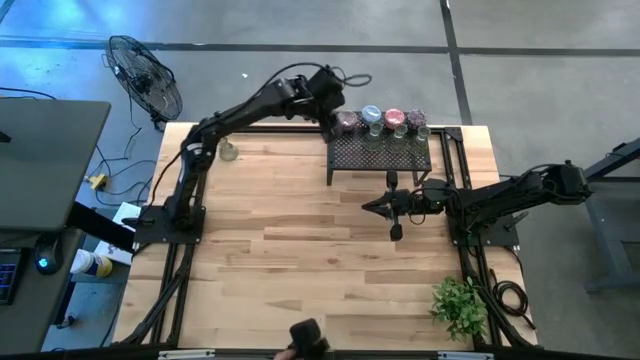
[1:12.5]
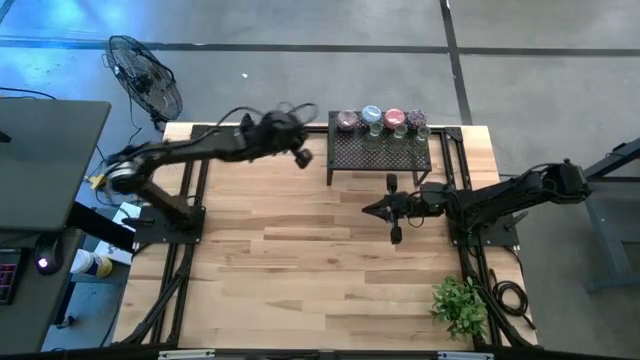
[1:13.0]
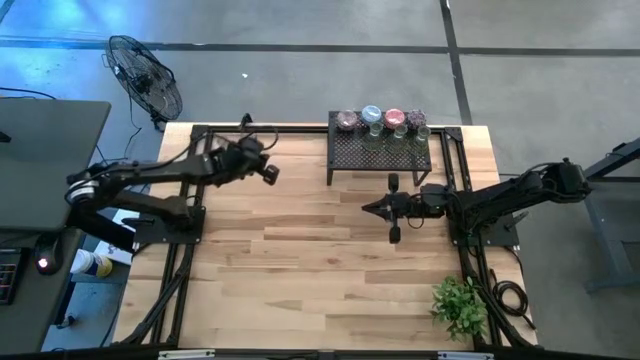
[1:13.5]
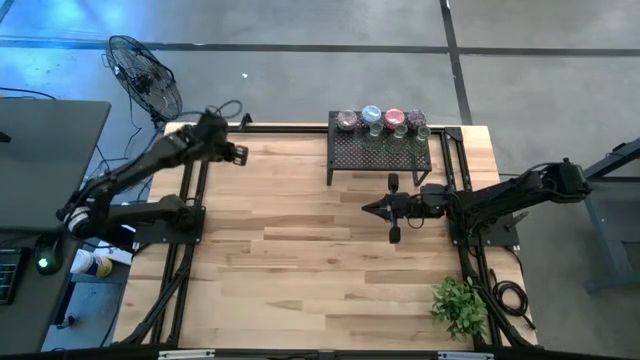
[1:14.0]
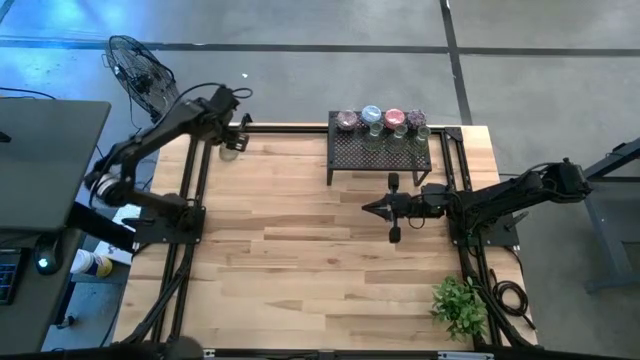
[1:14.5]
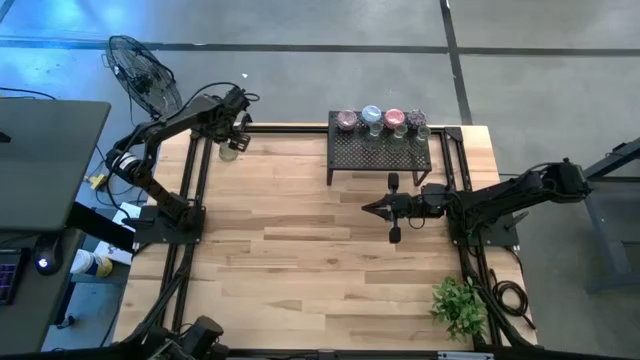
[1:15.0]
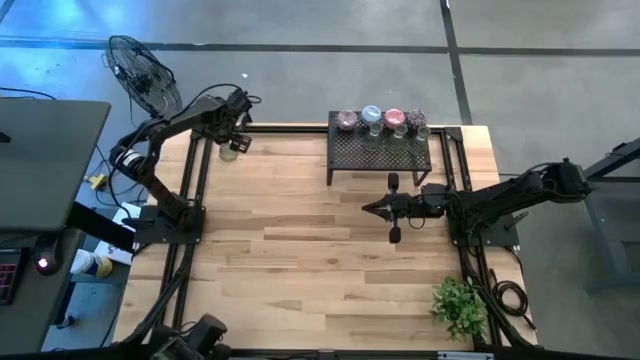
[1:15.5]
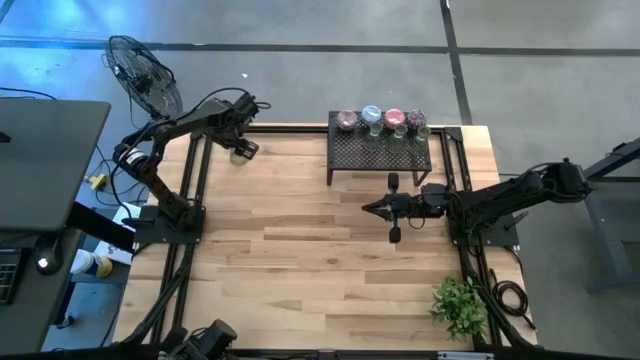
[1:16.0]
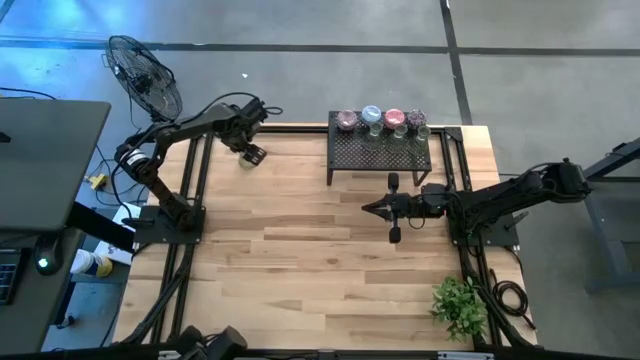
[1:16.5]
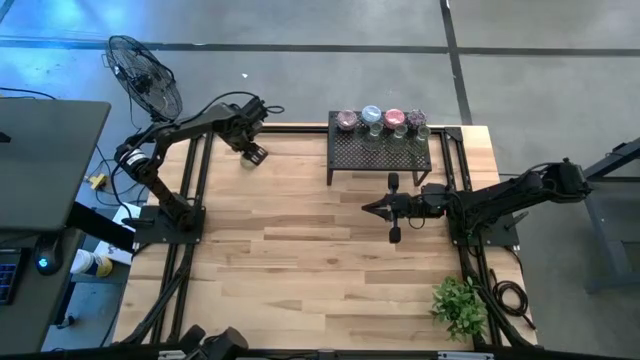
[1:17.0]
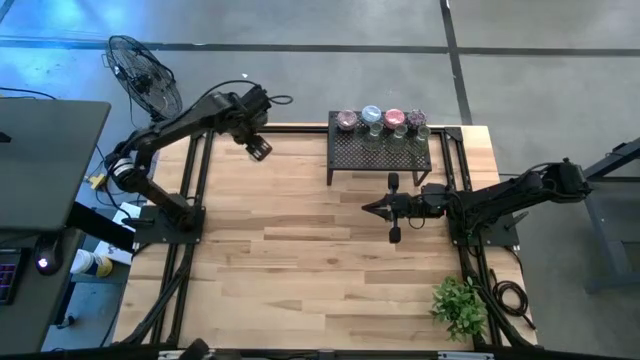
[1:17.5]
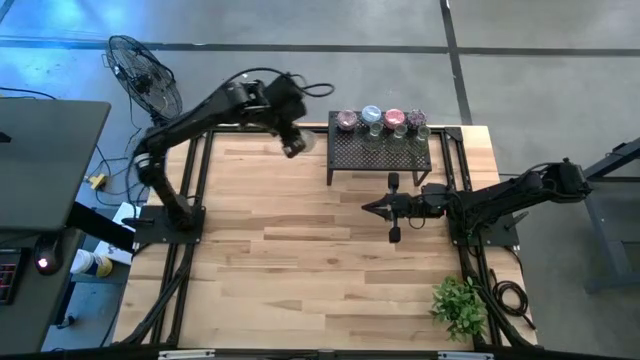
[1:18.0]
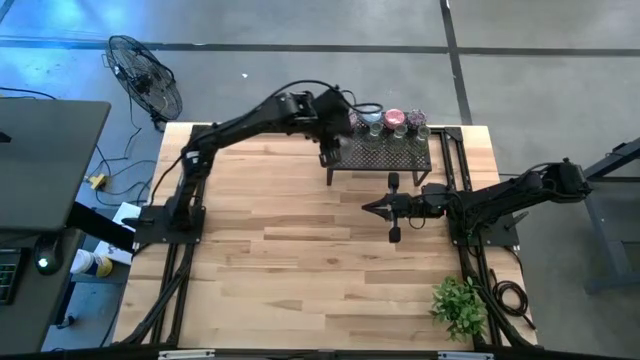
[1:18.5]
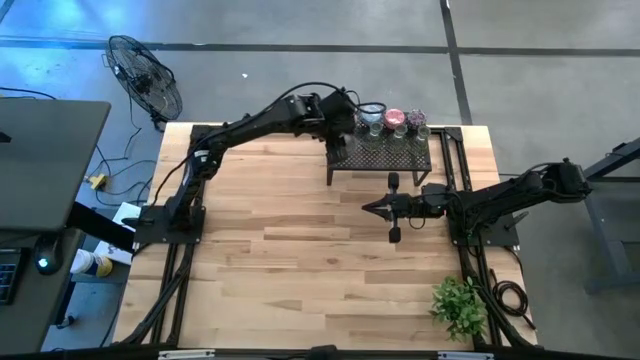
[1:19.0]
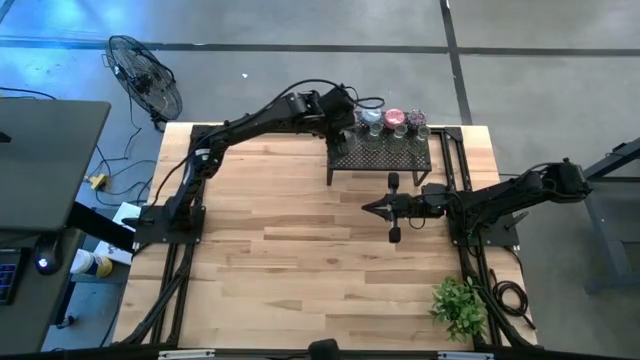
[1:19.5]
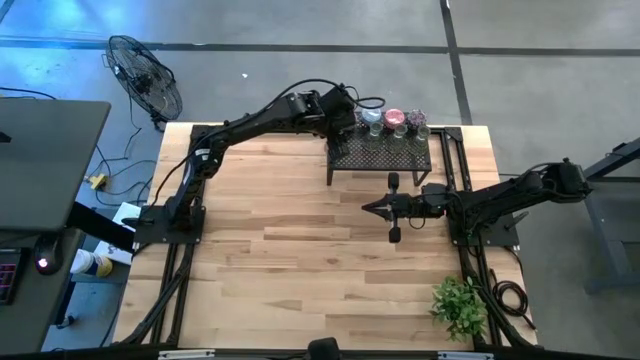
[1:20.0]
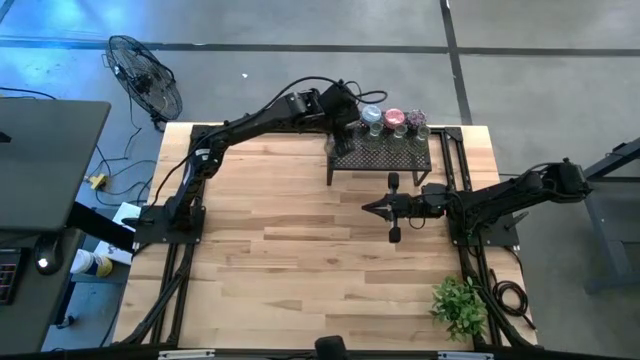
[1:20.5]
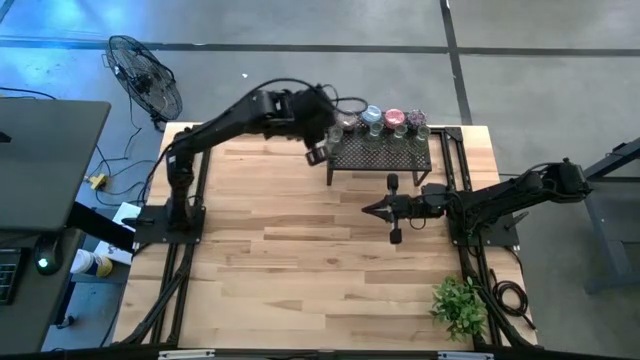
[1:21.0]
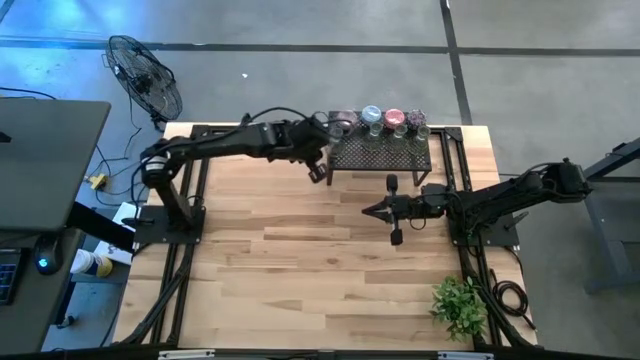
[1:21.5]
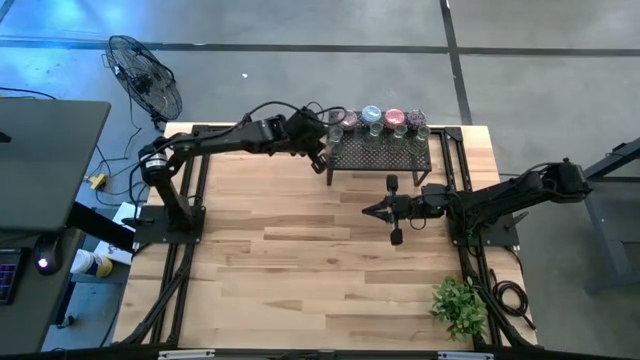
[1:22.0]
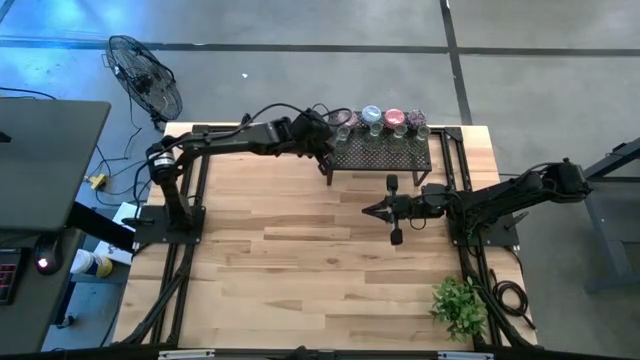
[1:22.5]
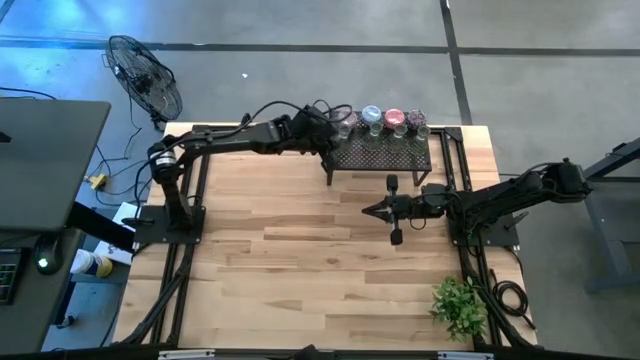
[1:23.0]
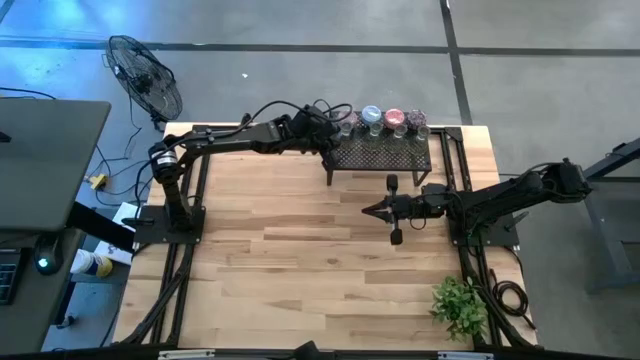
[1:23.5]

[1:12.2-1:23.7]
Task: Pick & Place candle stick holders
Put the green glass candle holder on the shelf aligned with the other green glass candle holders

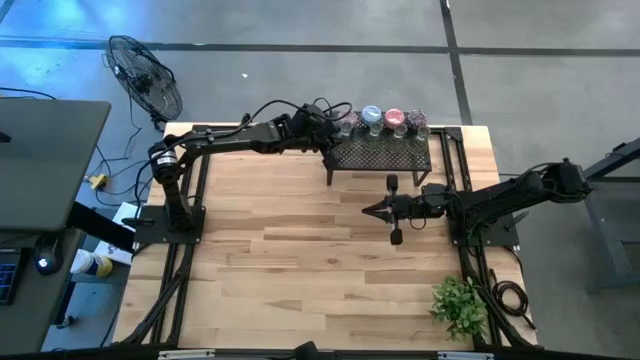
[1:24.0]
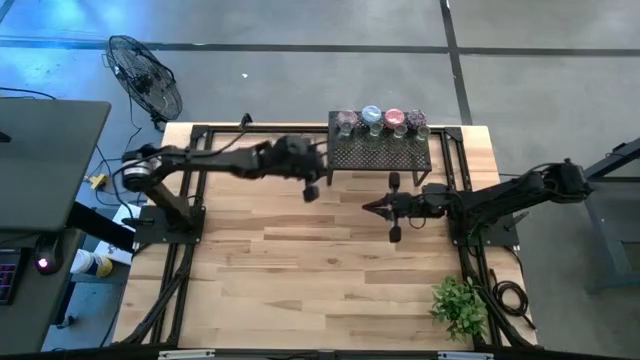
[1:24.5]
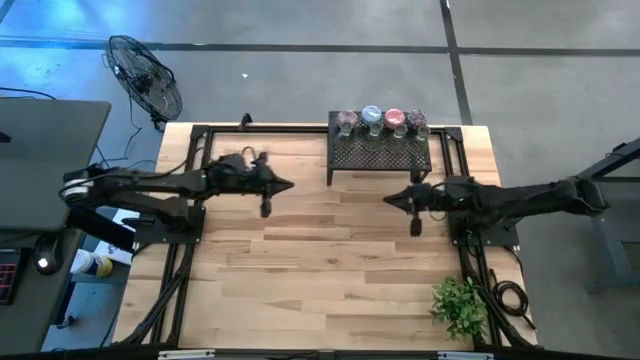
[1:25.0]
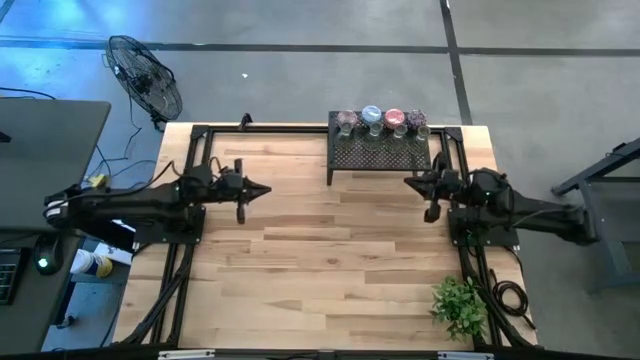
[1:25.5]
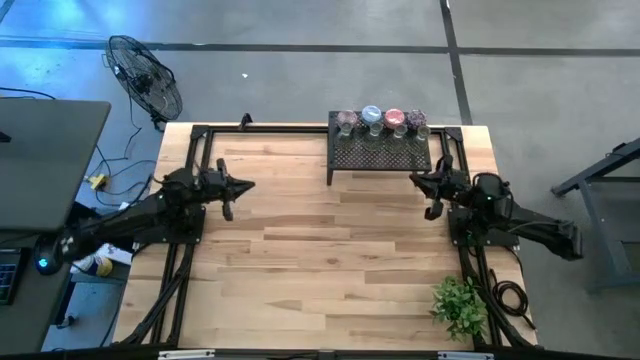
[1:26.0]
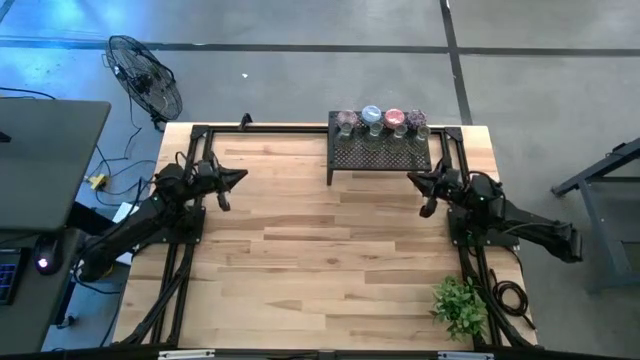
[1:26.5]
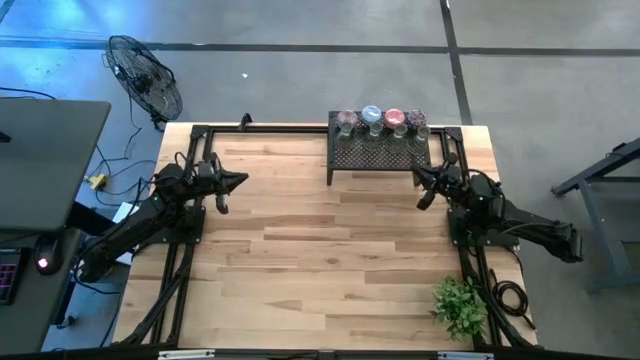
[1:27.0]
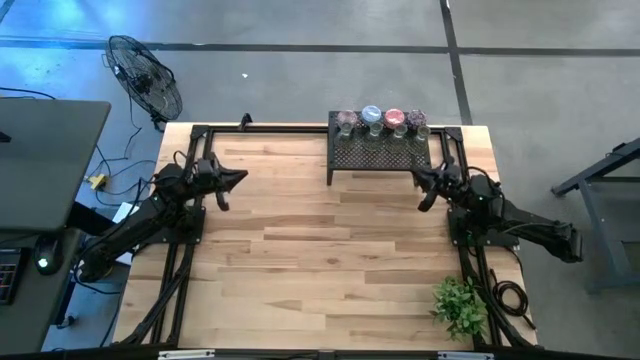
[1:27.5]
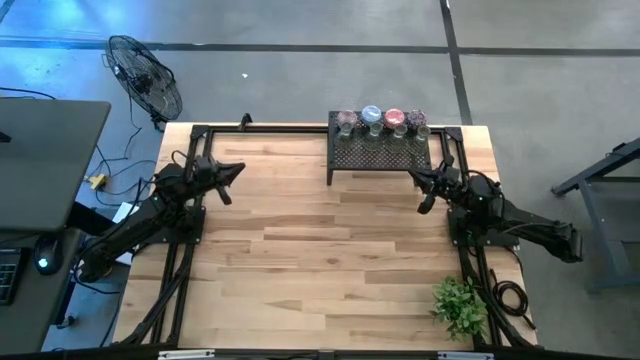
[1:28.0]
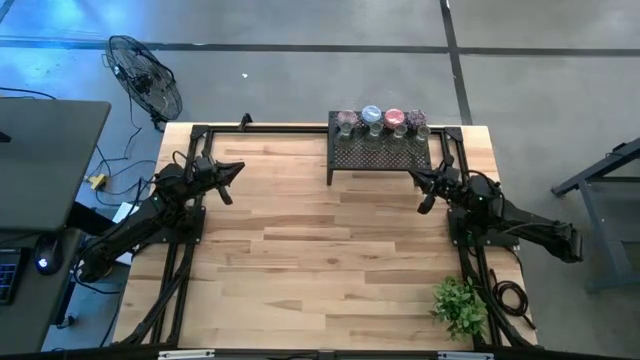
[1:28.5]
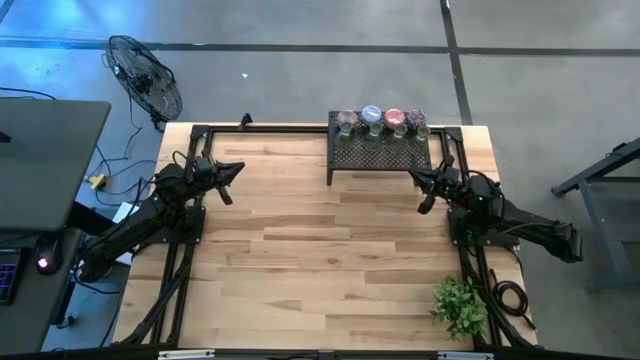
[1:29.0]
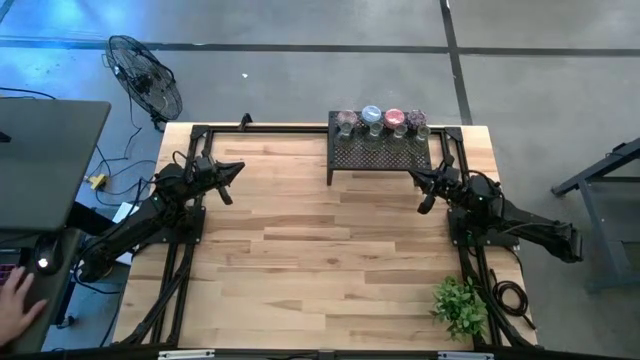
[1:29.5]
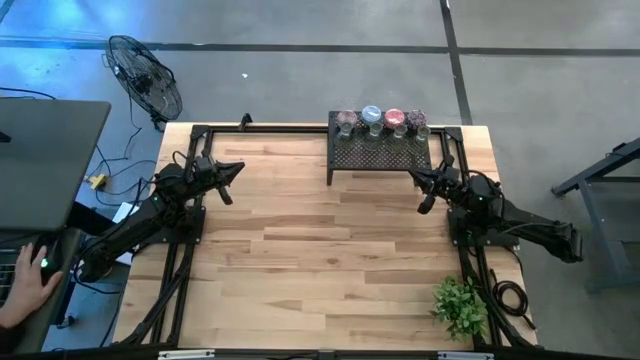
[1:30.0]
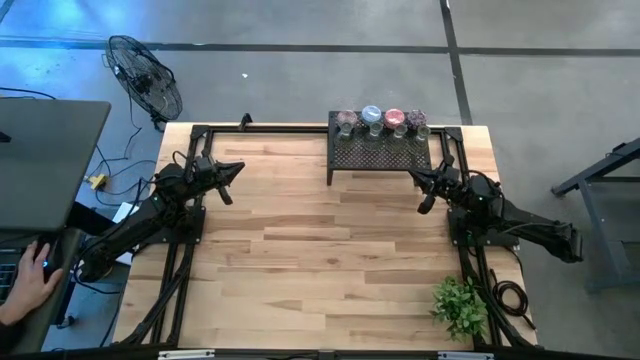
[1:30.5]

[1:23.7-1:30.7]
Return to Home Position

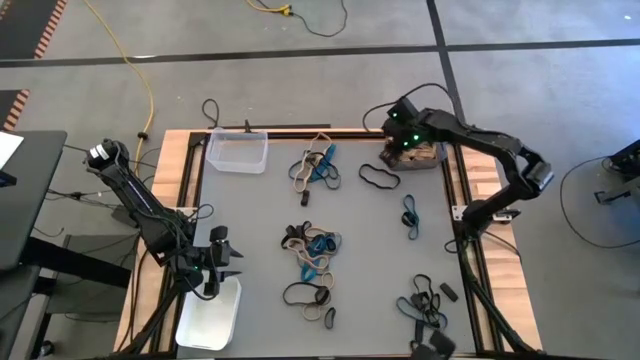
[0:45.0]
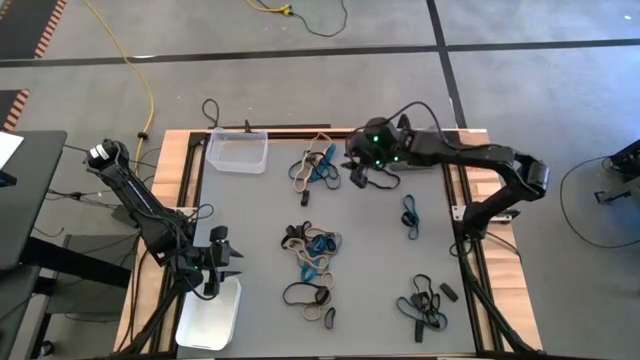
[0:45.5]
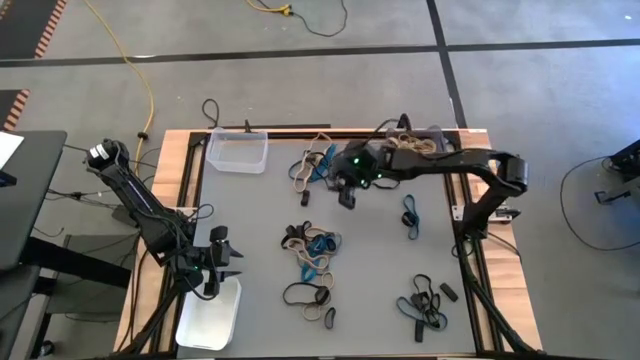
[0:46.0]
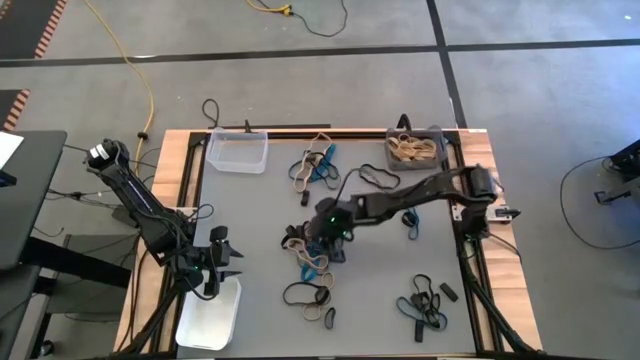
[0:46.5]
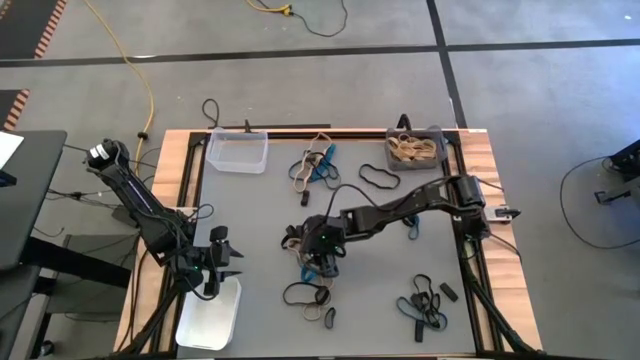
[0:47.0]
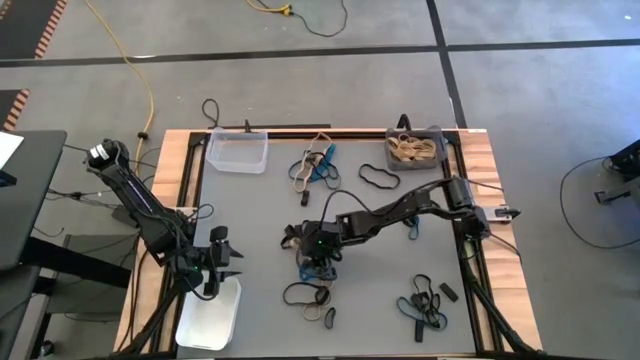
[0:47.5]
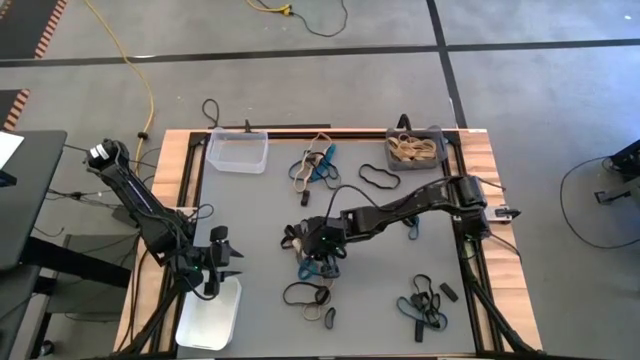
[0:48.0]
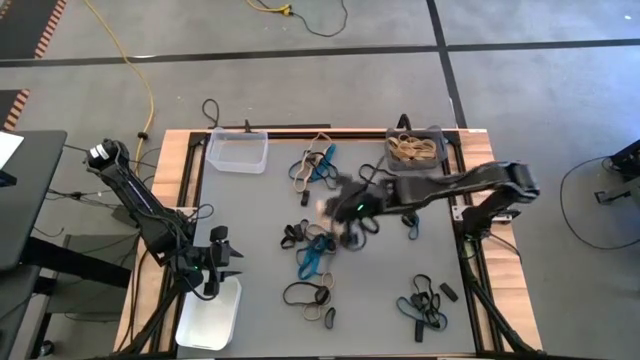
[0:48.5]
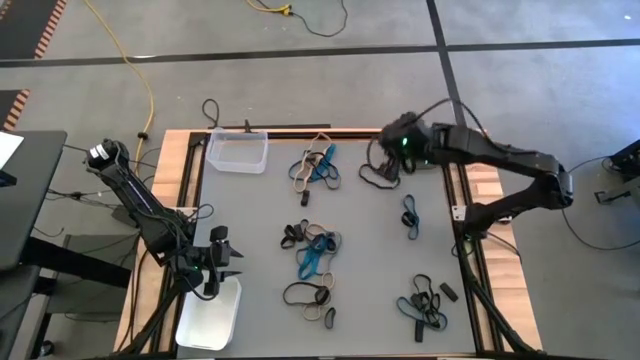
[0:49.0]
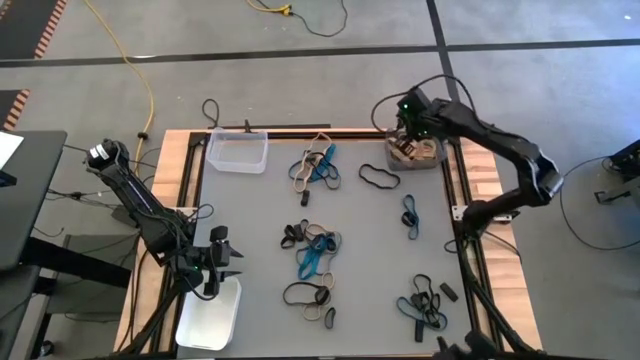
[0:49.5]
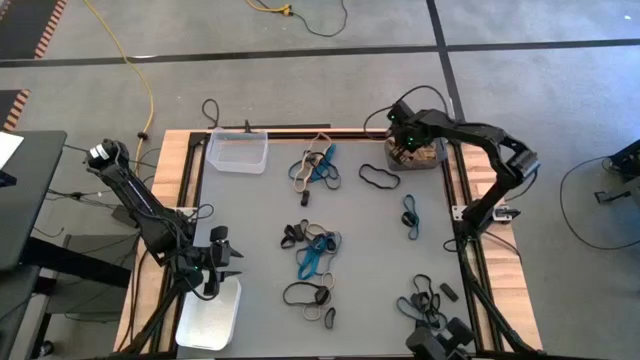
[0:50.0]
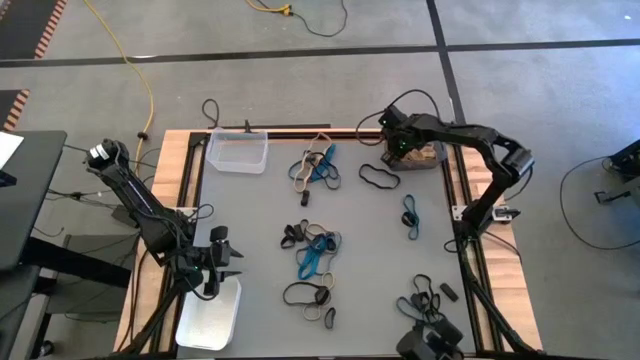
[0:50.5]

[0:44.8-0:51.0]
Task: Sort rubber bands into baskets
Put the white rubber band into the black transparent bin
